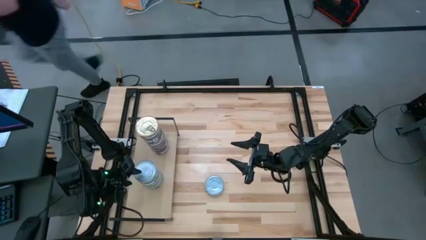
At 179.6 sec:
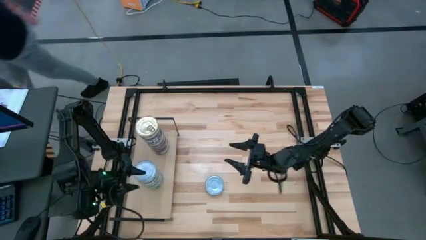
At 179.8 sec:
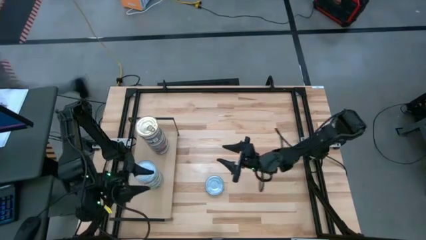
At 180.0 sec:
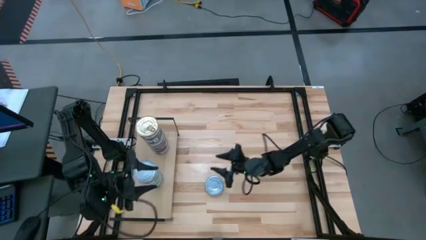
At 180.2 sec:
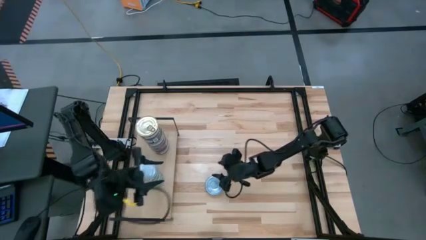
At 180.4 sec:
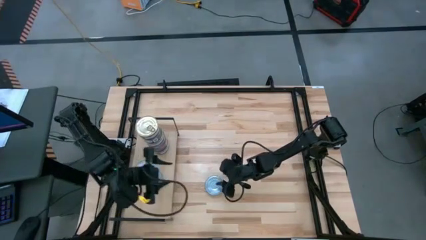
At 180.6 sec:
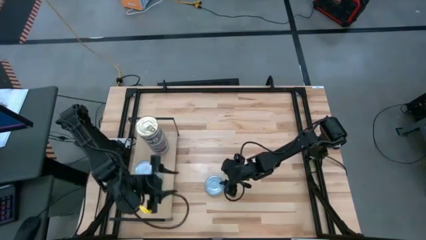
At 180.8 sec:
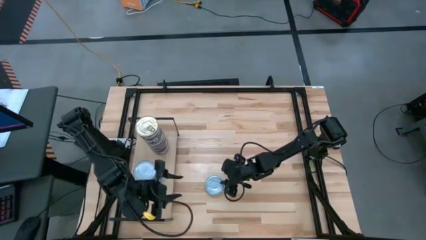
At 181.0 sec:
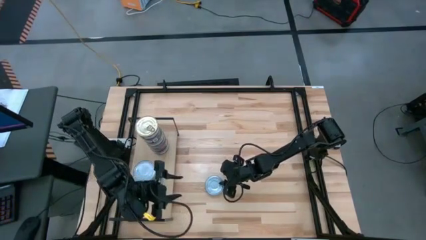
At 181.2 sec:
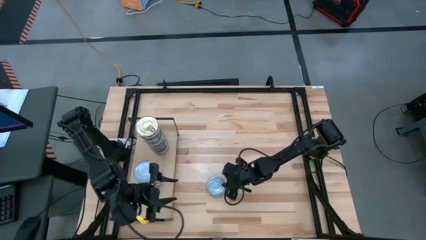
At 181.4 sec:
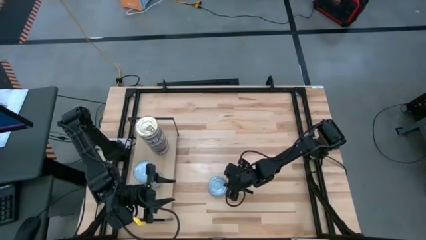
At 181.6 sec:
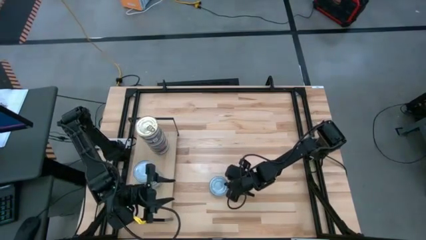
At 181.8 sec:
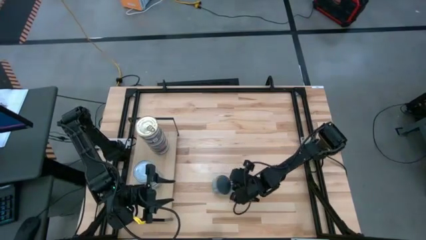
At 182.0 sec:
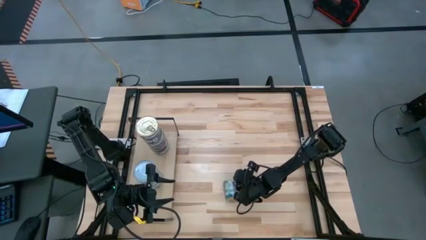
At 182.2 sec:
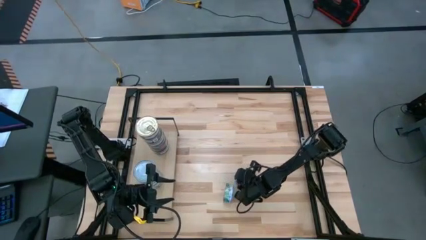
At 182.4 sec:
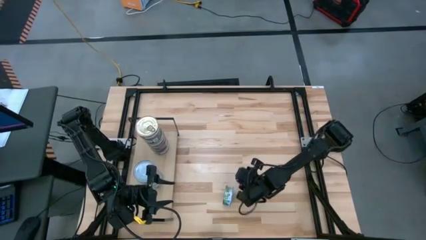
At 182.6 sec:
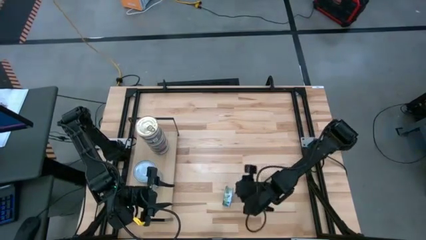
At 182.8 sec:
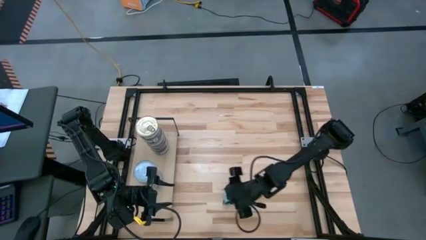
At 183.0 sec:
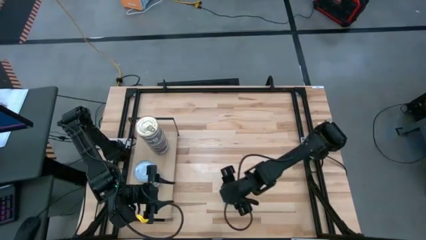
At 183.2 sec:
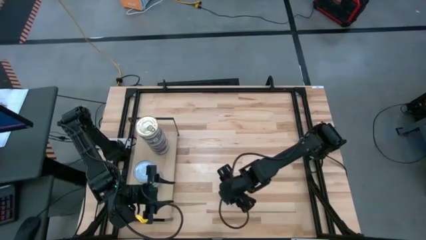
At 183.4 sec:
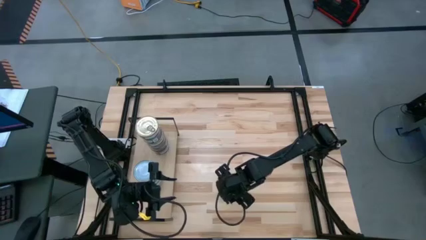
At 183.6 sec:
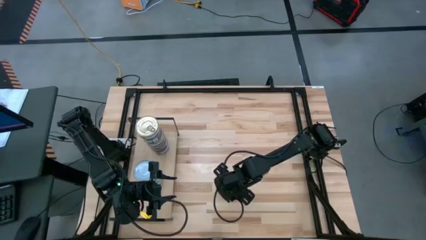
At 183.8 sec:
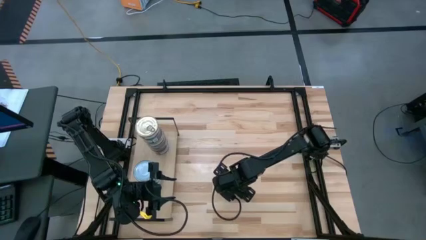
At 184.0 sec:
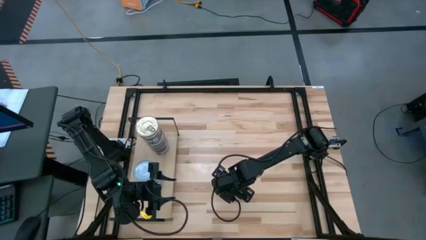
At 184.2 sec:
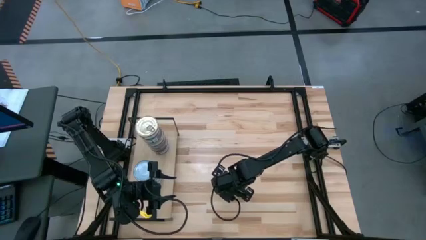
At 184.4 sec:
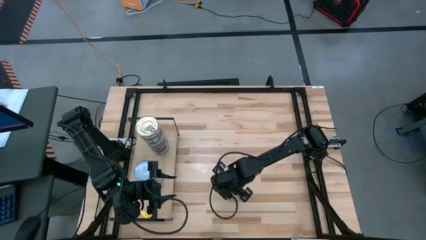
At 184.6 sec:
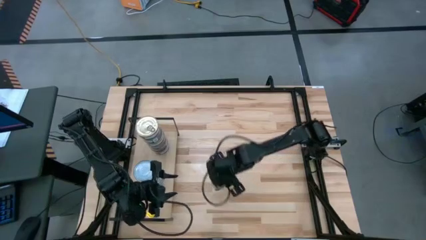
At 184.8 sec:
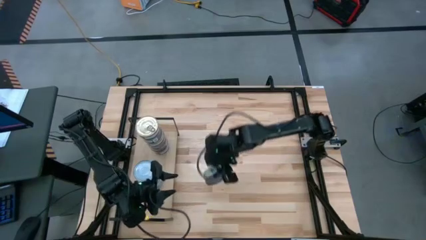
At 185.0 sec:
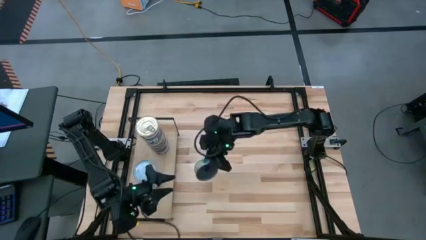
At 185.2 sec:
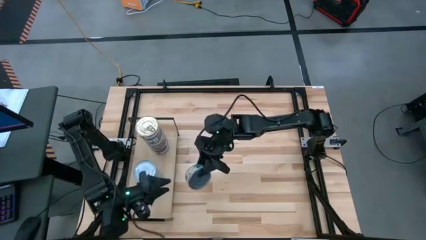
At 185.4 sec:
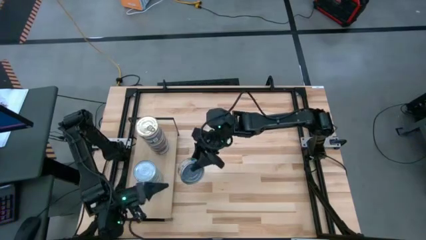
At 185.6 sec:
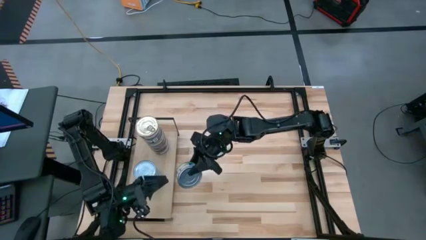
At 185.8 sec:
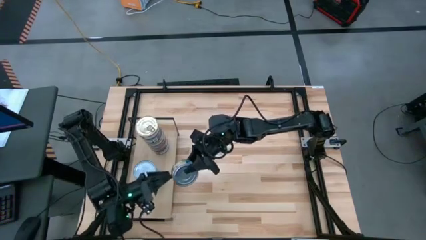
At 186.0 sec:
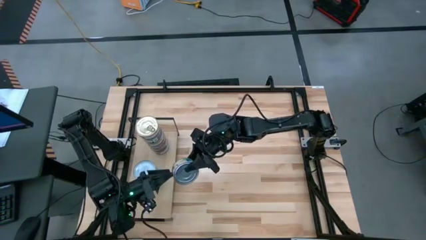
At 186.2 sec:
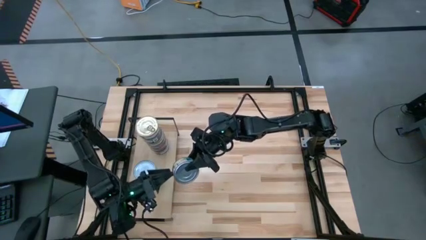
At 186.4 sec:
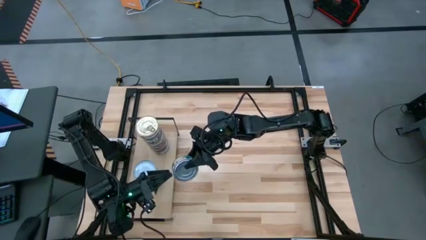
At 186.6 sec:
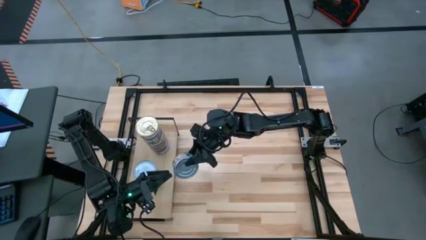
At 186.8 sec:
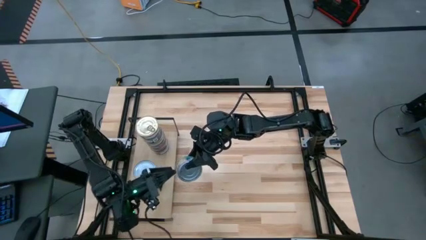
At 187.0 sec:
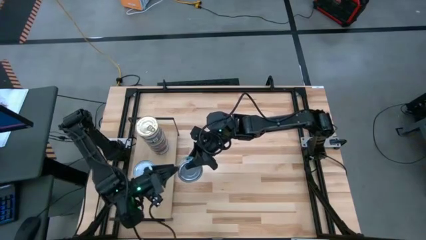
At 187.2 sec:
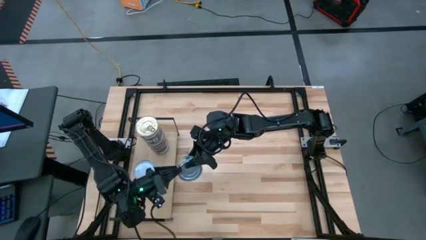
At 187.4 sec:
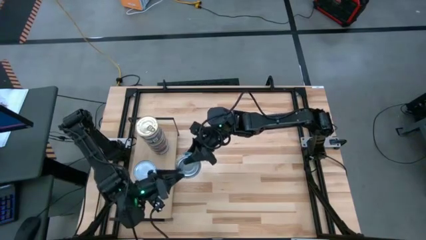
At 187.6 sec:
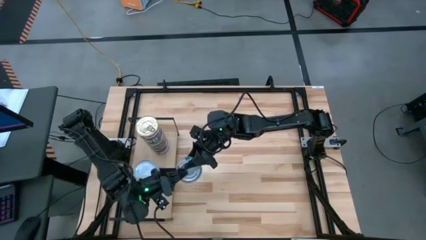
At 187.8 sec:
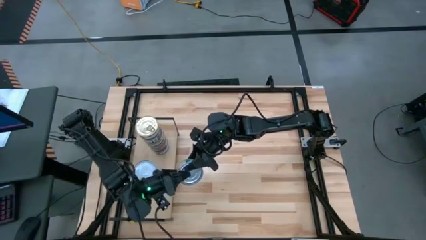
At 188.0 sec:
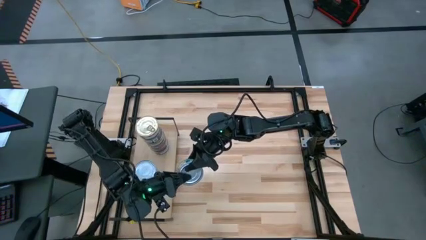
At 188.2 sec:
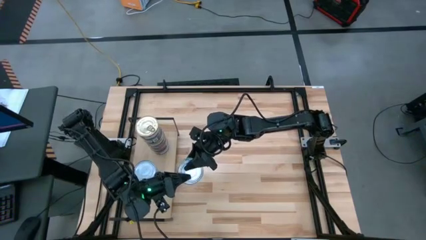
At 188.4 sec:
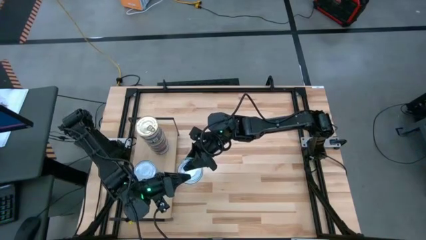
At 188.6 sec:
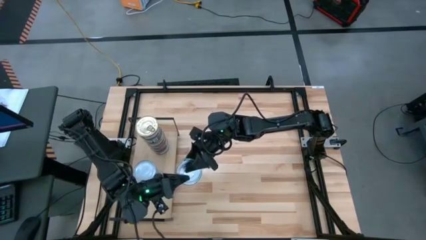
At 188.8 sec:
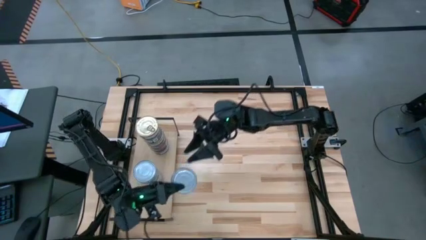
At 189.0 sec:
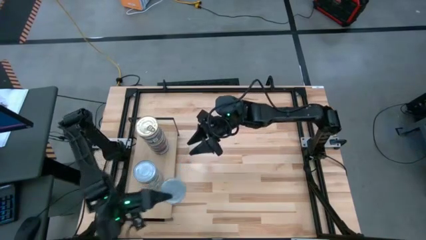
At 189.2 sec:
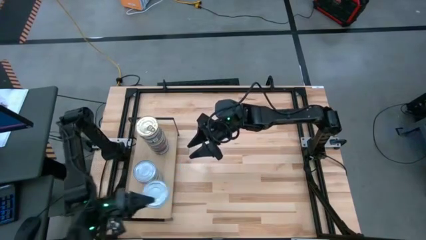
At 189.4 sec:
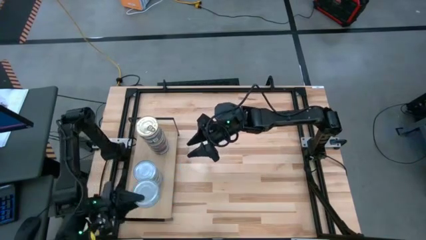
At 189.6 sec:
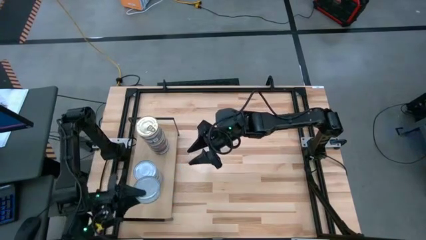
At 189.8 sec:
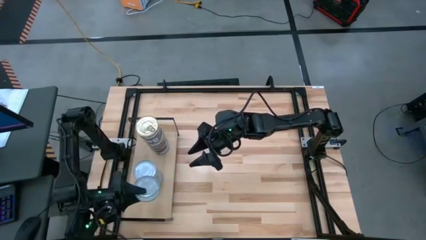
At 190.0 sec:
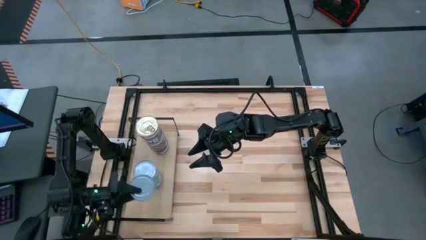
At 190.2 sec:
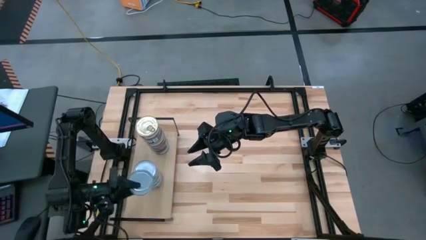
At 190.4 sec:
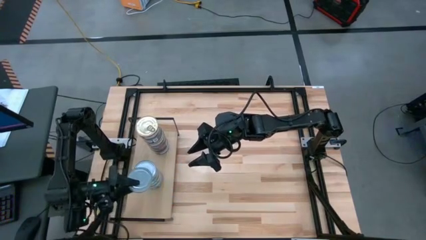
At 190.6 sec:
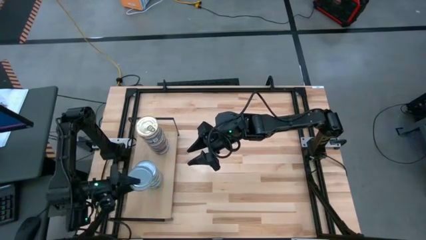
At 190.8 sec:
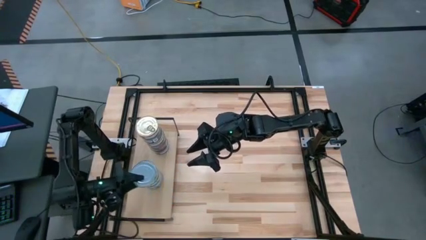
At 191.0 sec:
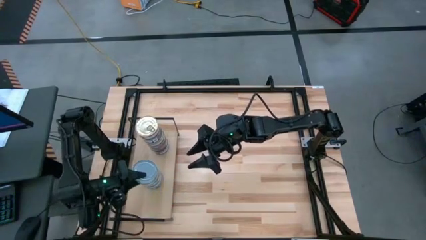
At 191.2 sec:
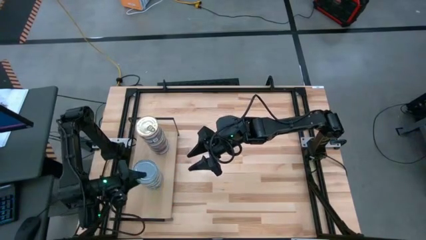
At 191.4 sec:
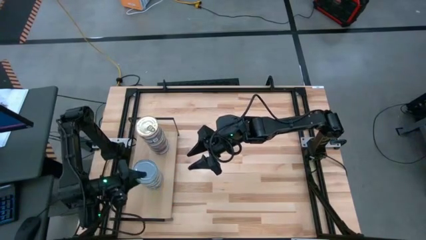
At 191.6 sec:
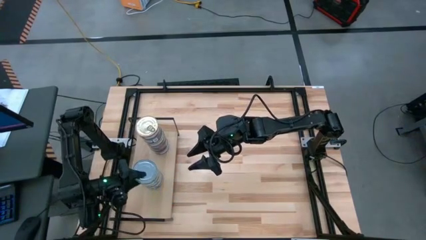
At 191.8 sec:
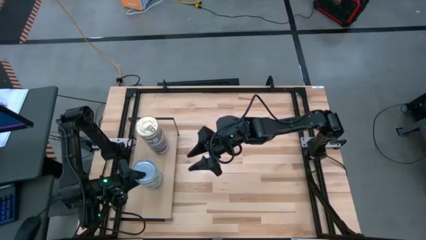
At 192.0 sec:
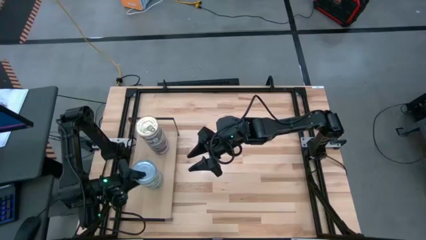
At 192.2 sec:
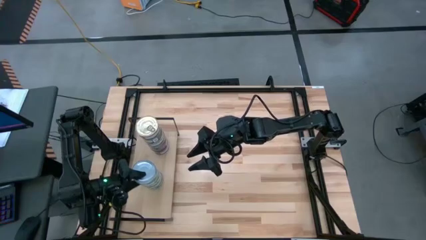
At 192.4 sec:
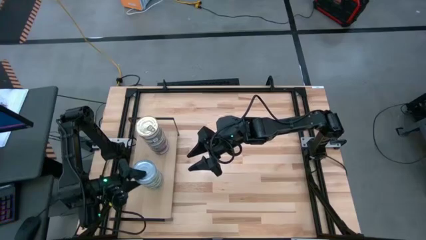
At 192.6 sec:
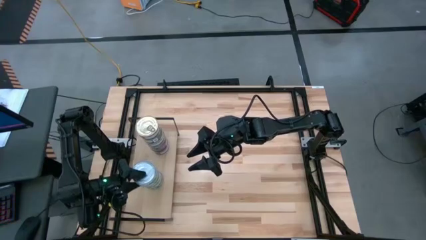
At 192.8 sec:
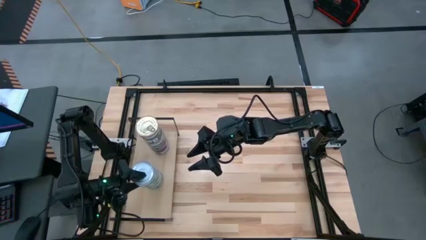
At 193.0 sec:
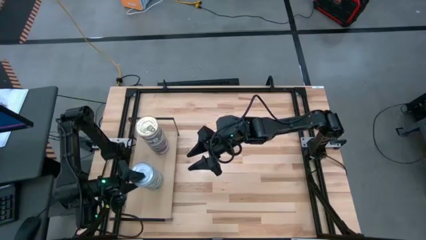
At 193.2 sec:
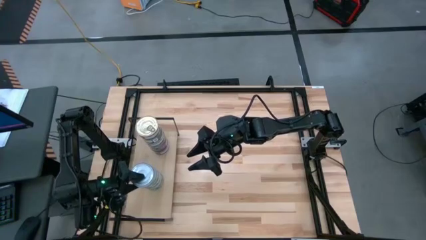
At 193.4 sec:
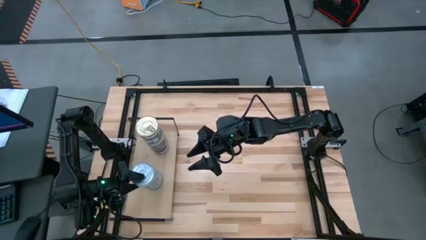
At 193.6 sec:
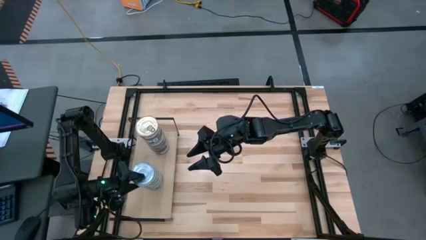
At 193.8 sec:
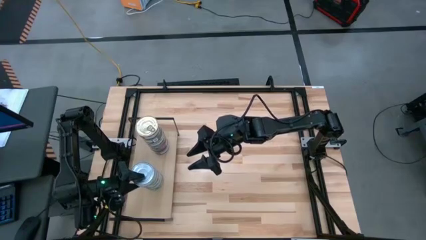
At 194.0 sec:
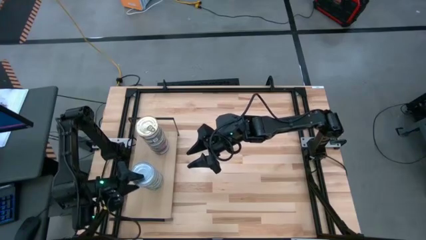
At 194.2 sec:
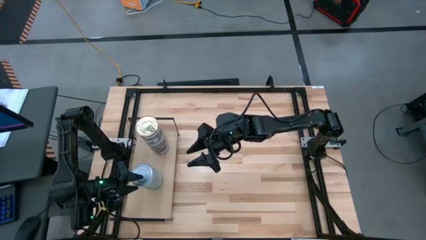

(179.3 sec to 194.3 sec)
Task: Stack canned seafood by type on shelf
Stack the green and white tuna can on the green and white tuna can on the shelf
